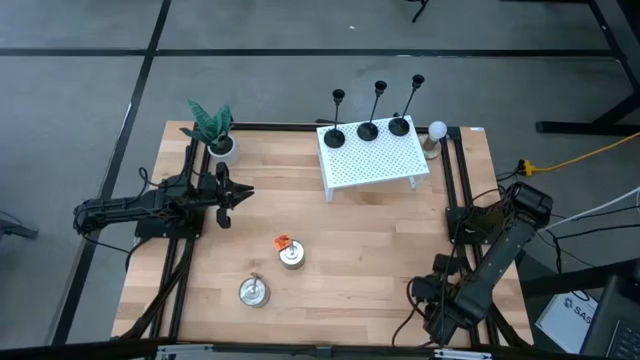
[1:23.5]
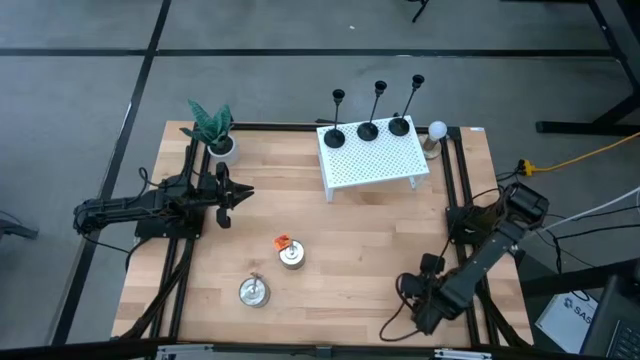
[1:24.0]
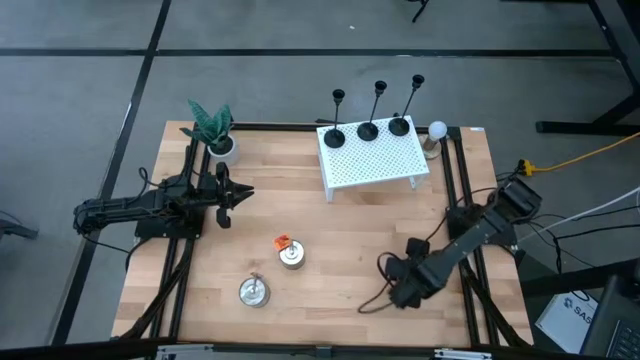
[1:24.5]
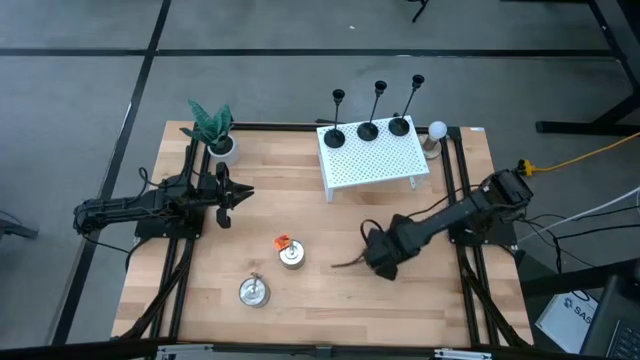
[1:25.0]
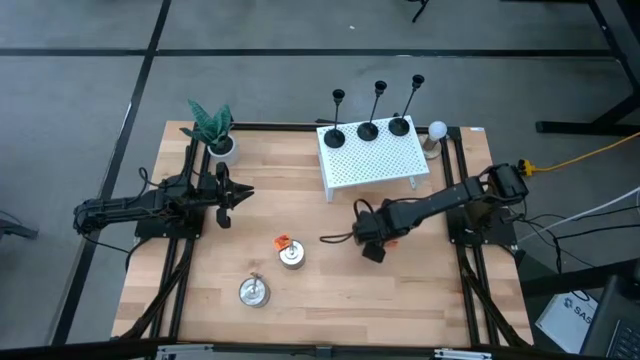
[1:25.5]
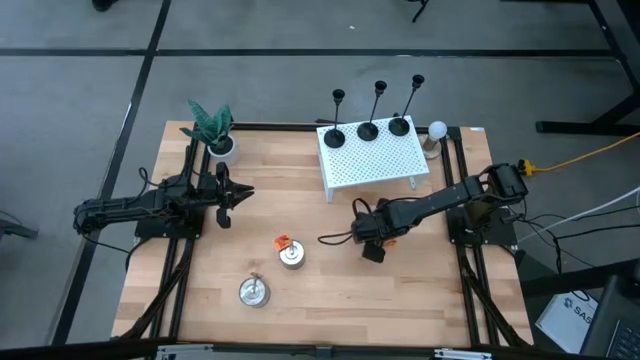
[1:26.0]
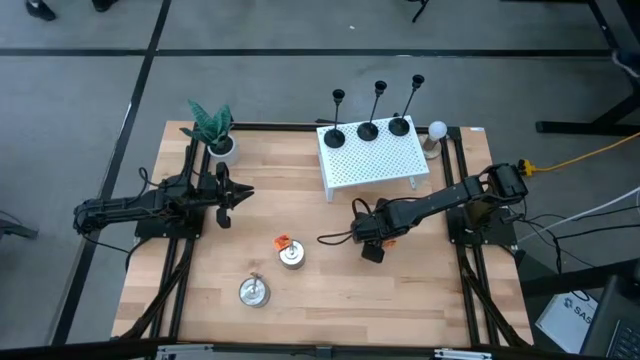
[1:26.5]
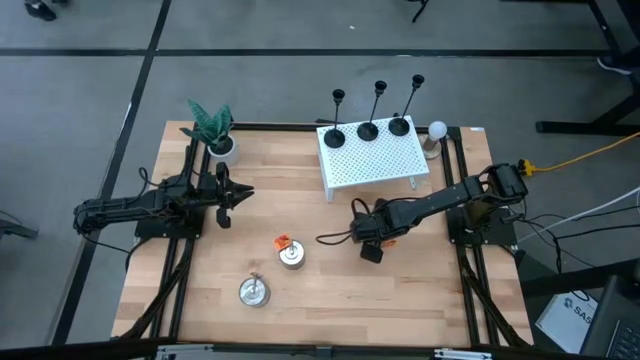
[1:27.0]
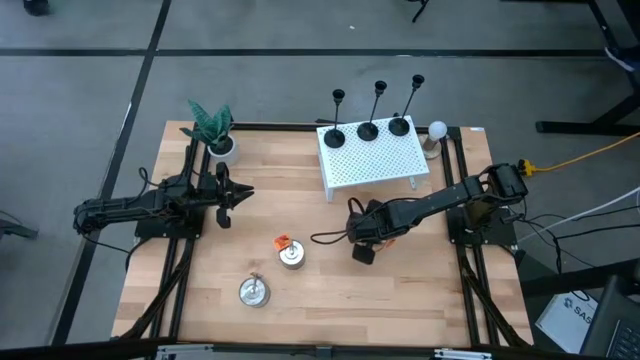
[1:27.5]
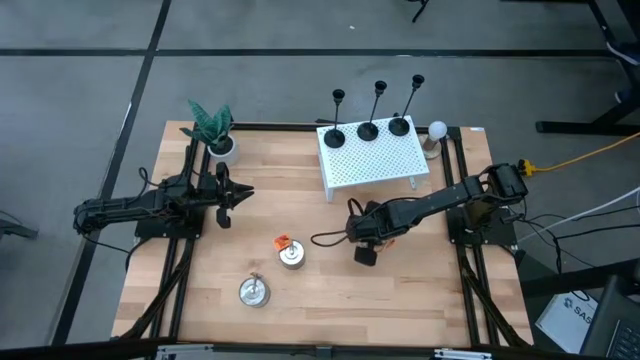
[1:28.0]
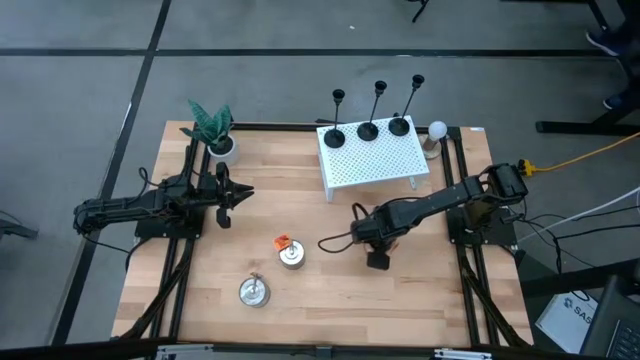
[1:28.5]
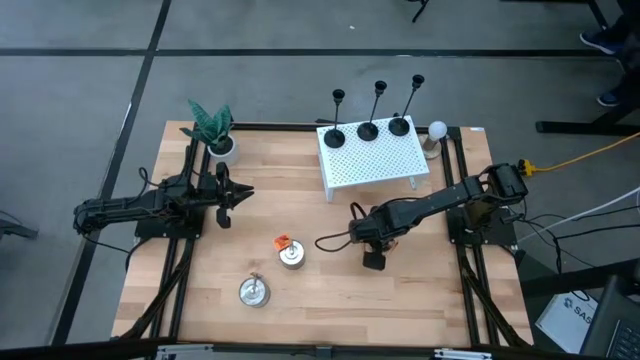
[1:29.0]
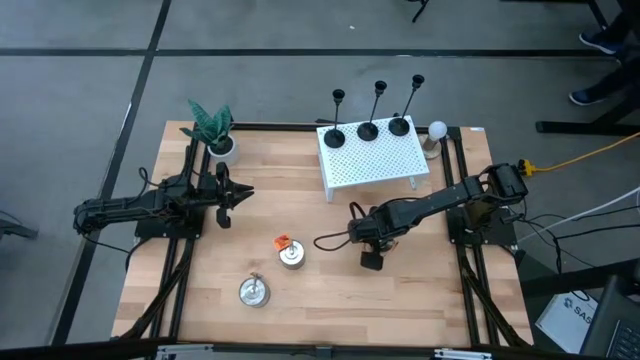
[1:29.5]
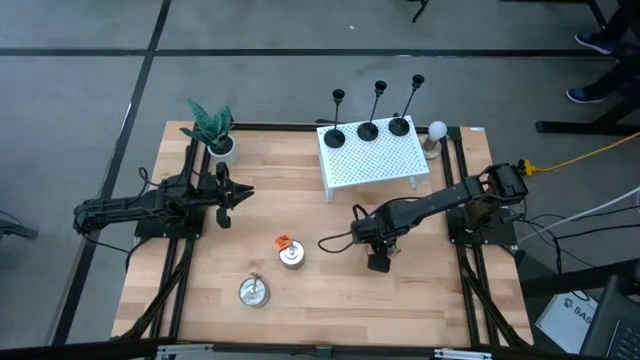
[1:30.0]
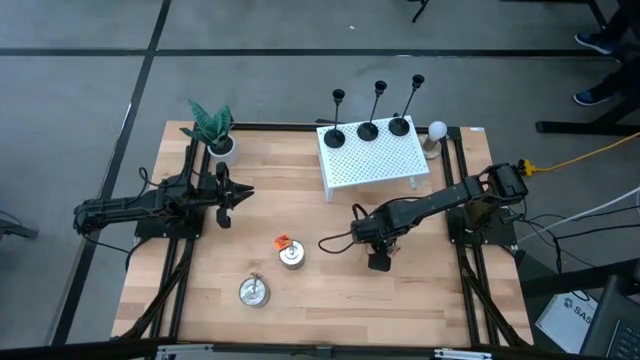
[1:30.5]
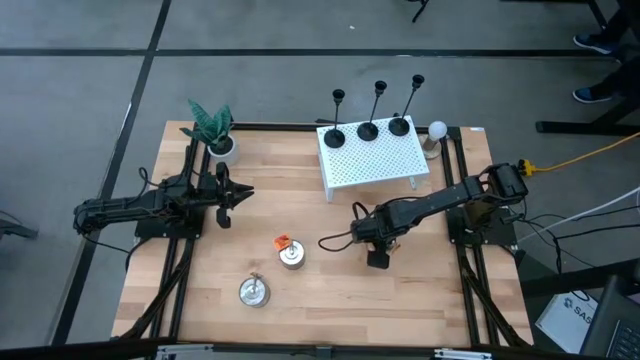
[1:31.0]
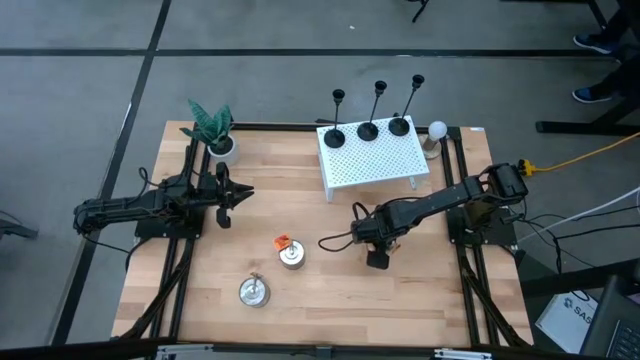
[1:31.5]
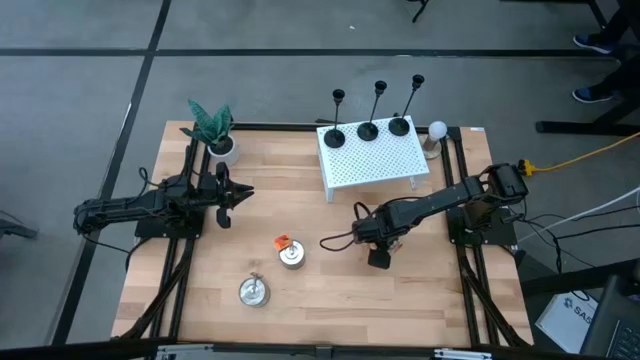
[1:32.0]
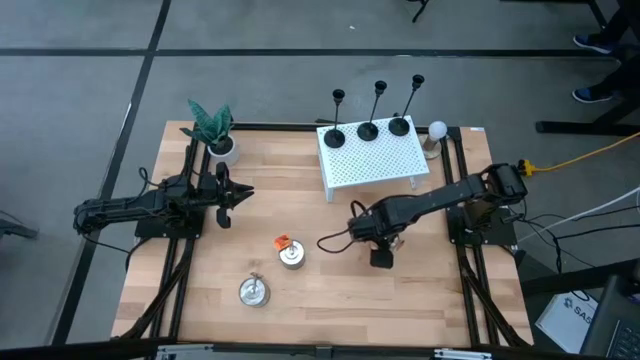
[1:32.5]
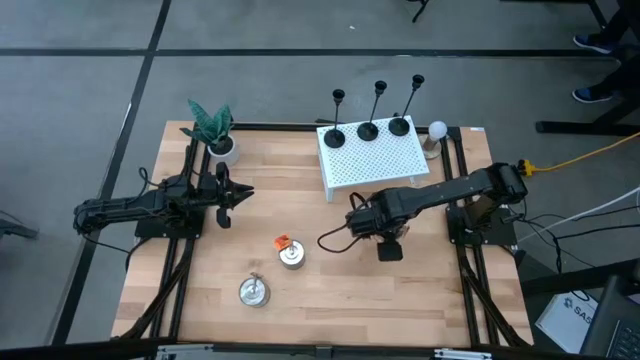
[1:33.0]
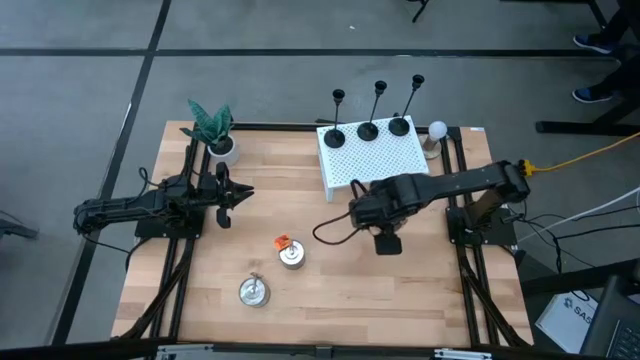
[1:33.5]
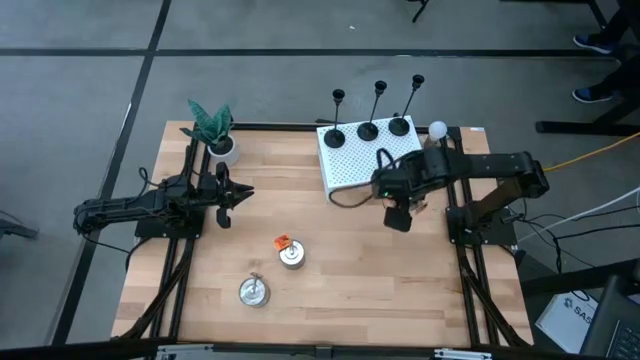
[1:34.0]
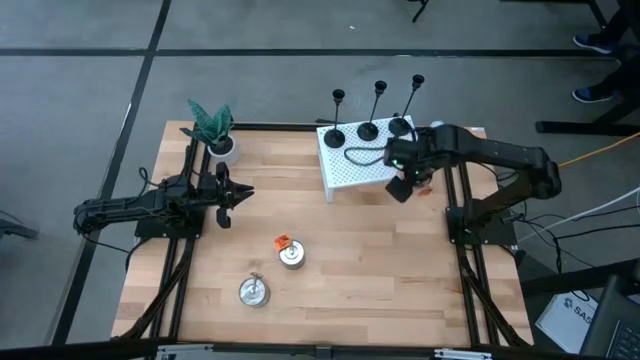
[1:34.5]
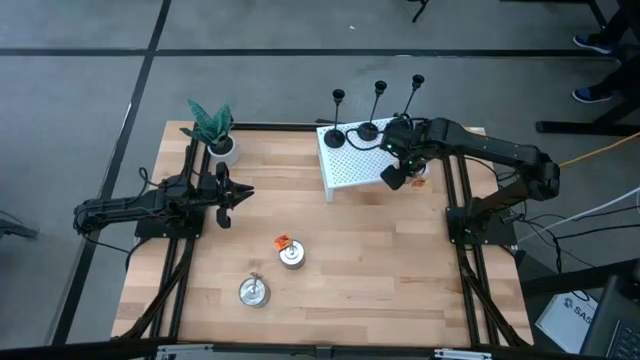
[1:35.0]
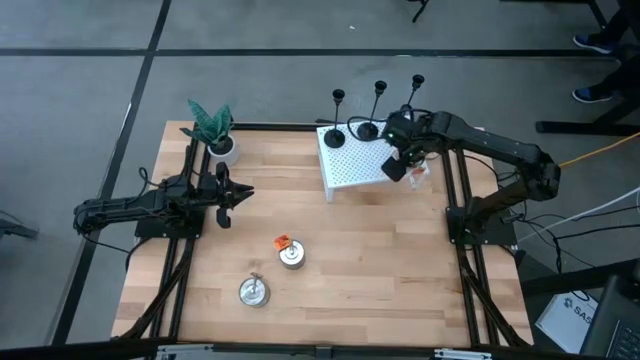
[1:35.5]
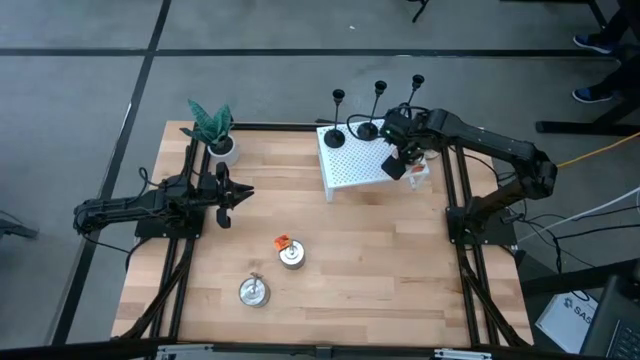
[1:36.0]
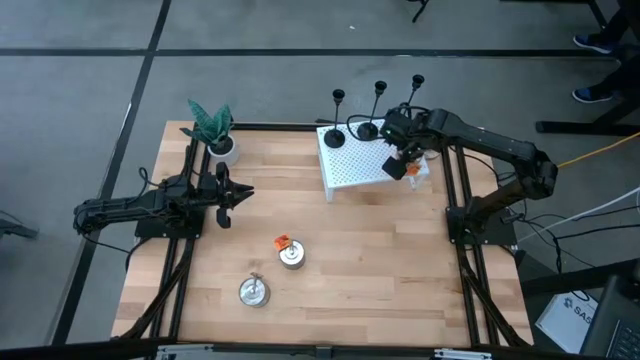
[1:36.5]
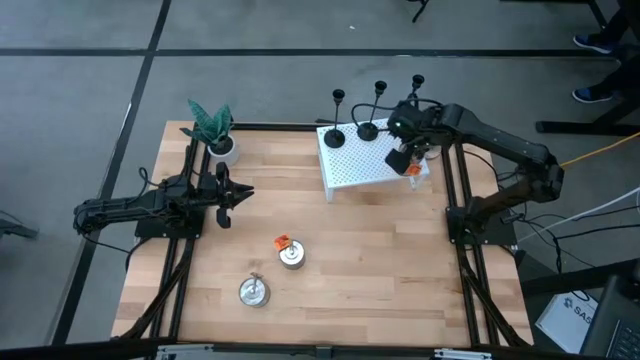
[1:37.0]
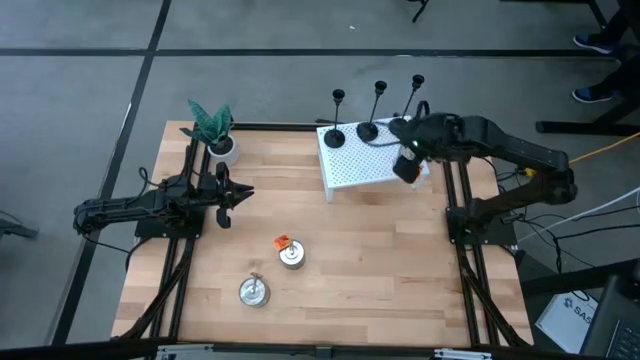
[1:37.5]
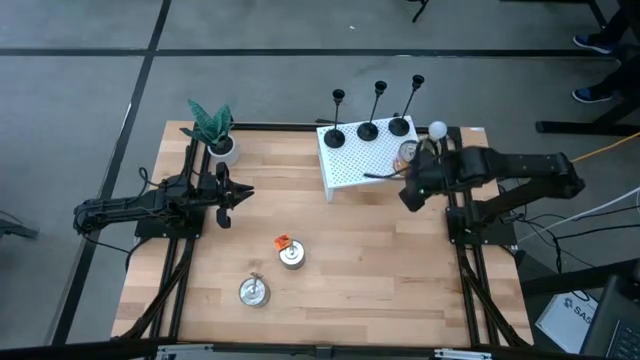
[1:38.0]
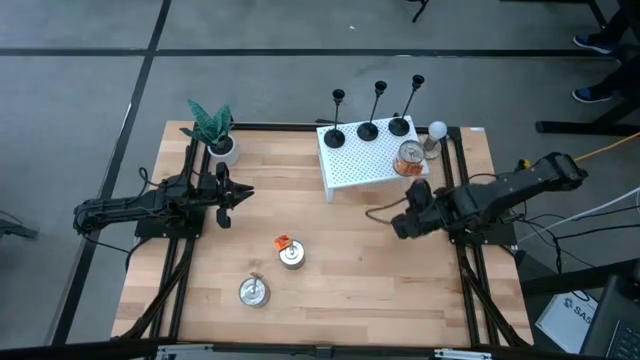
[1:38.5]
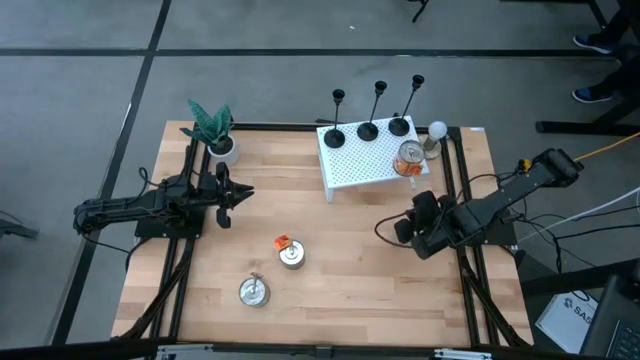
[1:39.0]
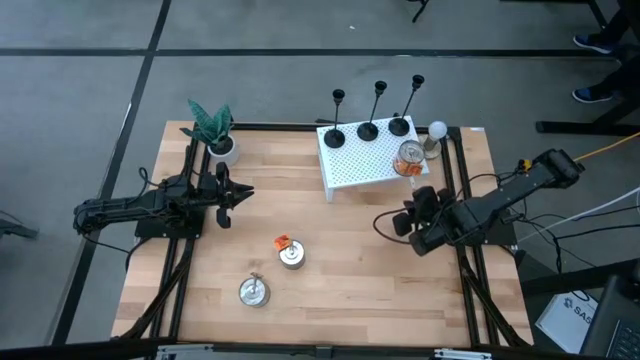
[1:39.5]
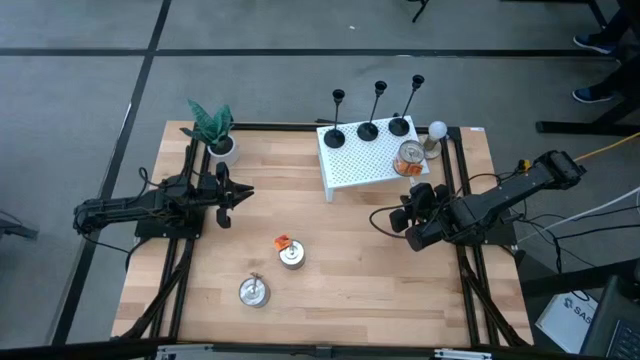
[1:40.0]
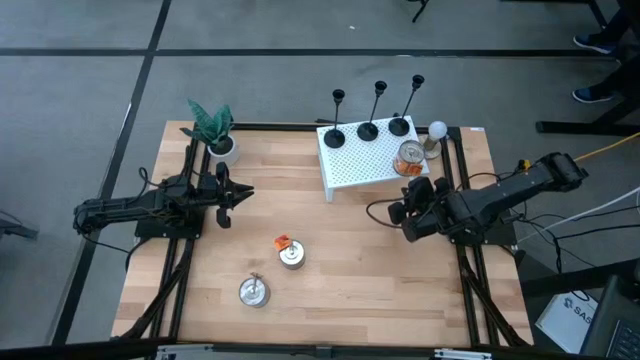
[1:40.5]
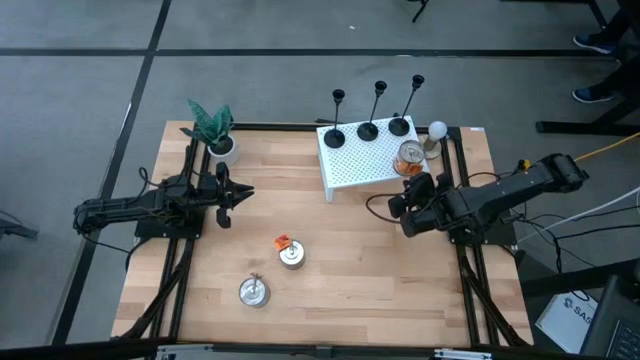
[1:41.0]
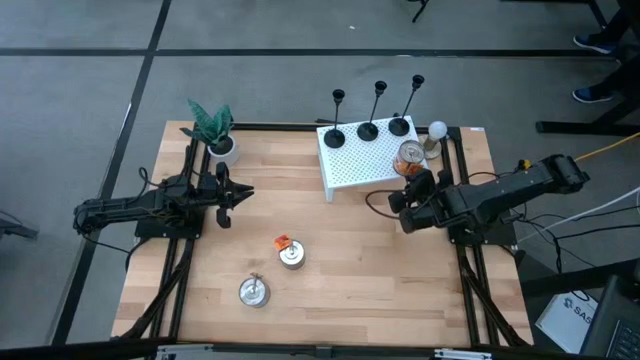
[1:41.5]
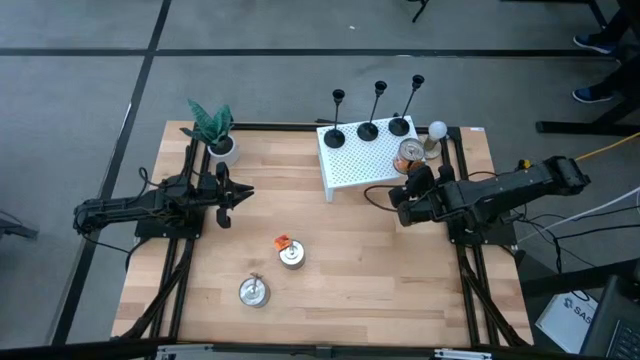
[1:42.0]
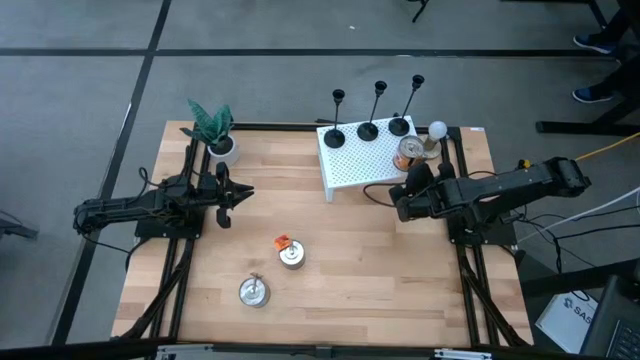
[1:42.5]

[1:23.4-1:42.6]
Task: Pick & Place candle stick holders
Put the bottom orange scented candle on the shelf

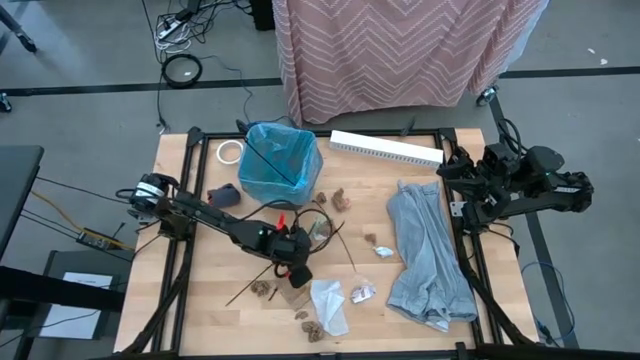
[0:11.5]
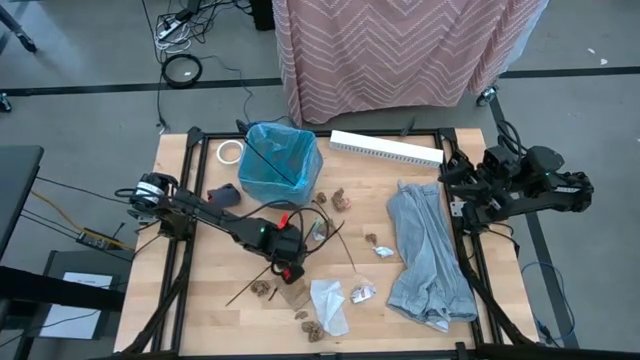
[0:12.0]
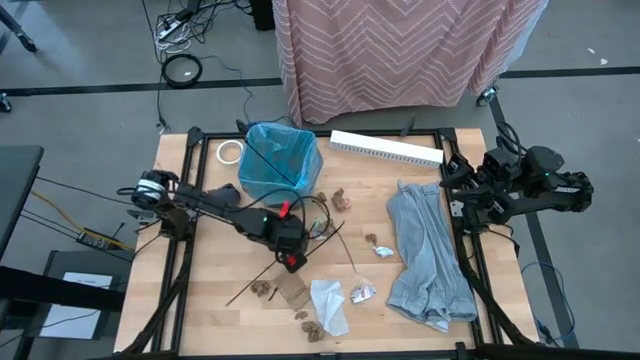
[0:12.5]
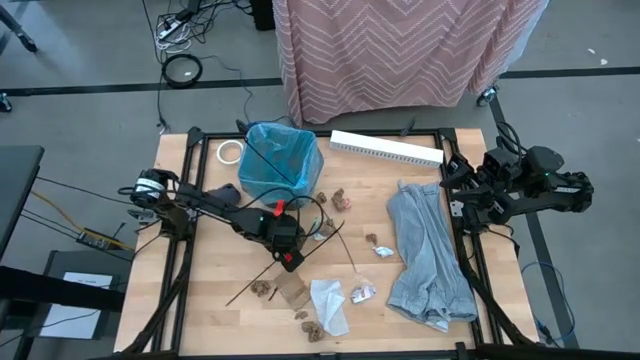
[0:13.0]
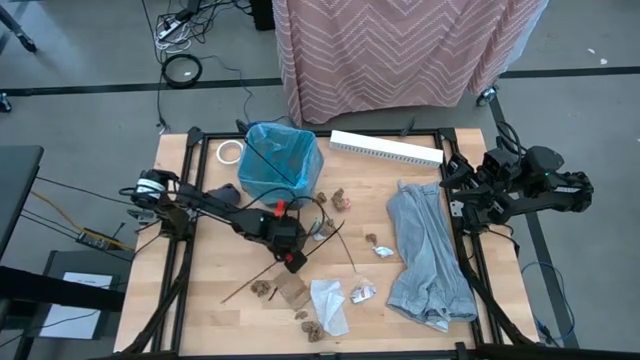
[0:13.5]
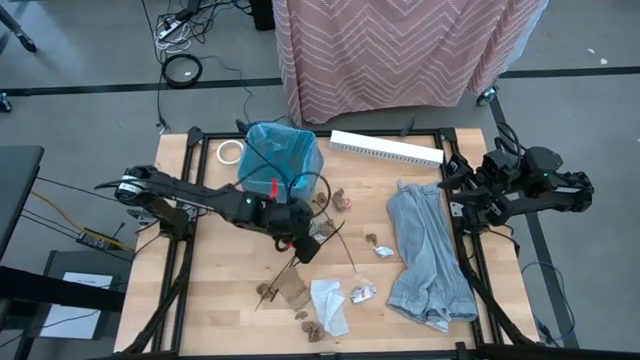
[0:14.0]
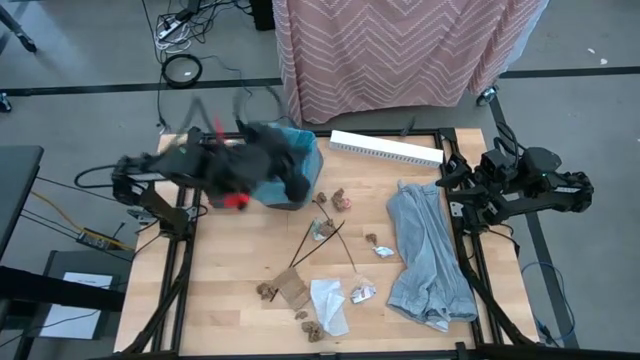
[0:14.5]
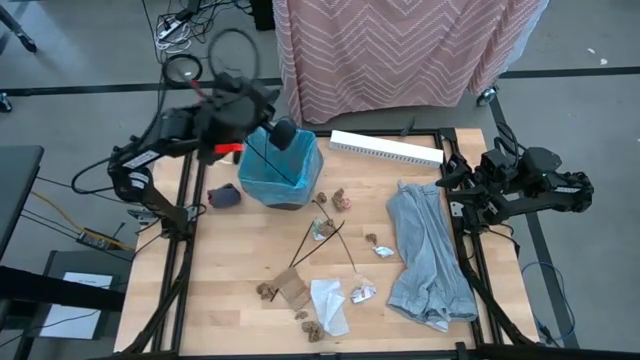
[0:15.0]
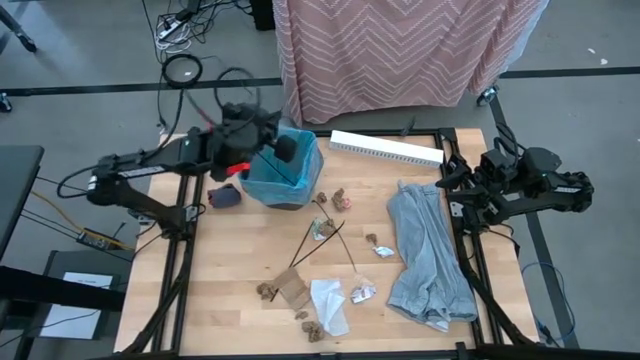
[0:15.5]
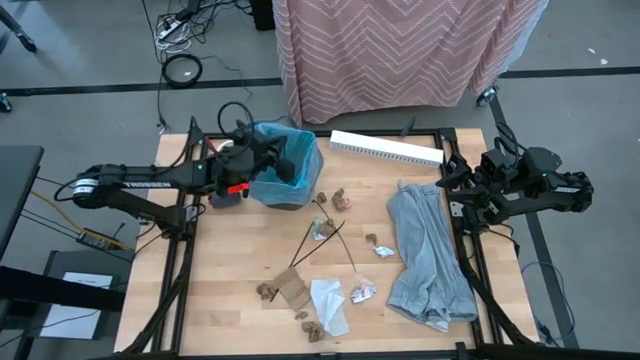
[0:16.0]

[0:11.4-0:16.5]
Task: place trash/remove bag and relplace
Put the black zip tie into the black trash bin
